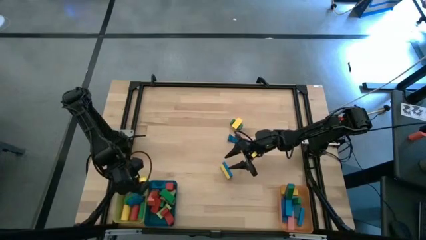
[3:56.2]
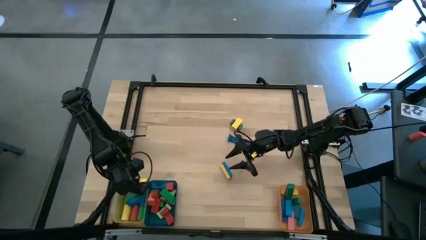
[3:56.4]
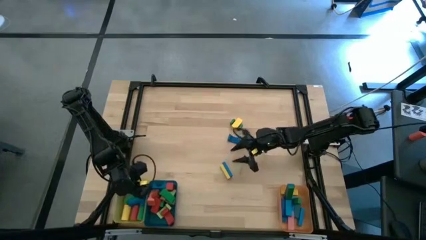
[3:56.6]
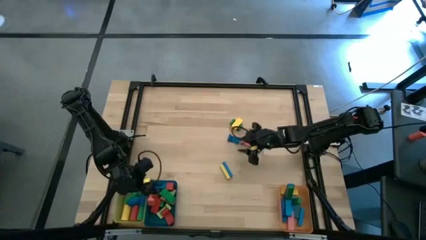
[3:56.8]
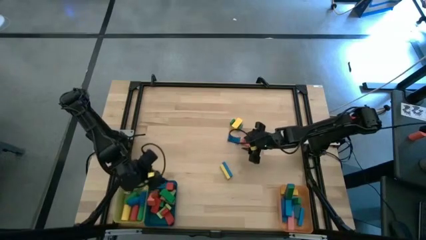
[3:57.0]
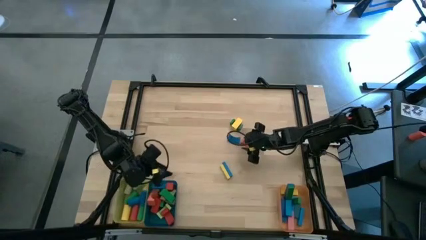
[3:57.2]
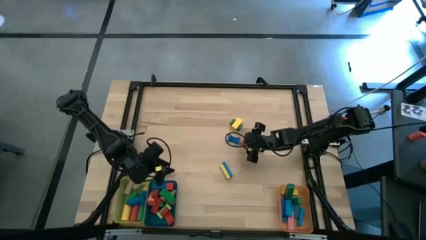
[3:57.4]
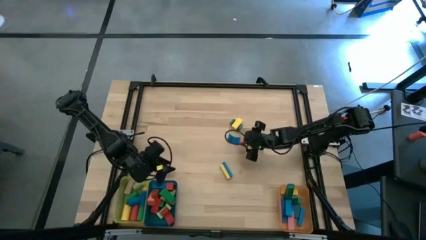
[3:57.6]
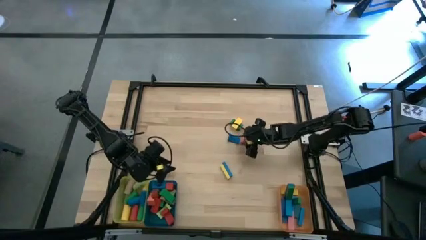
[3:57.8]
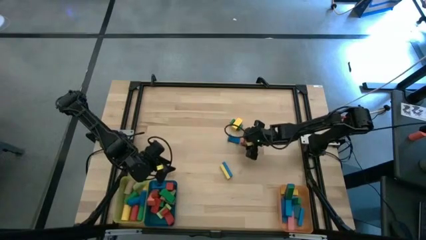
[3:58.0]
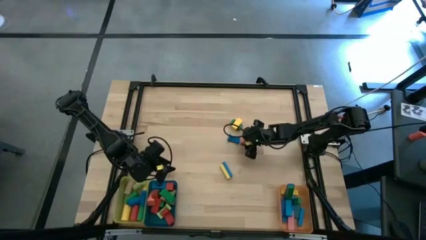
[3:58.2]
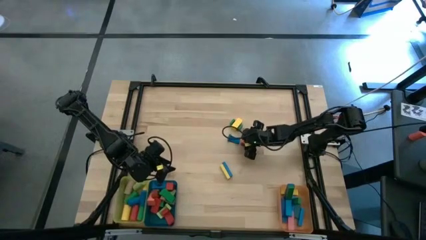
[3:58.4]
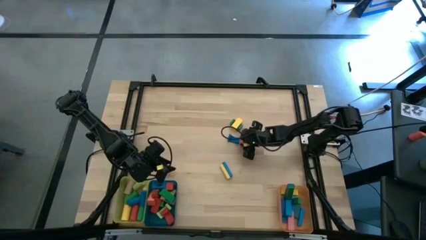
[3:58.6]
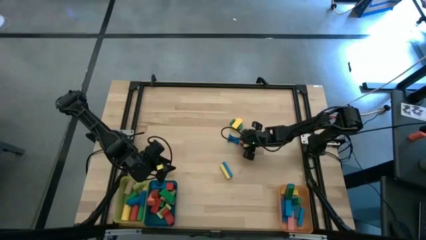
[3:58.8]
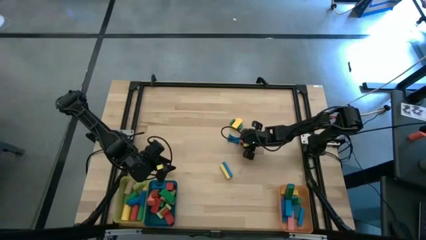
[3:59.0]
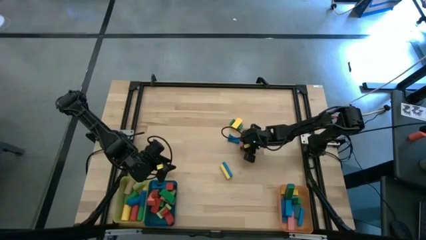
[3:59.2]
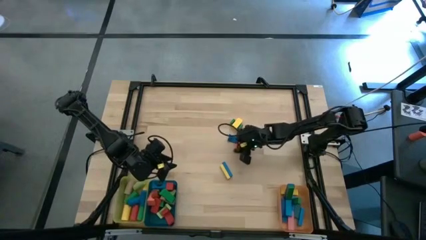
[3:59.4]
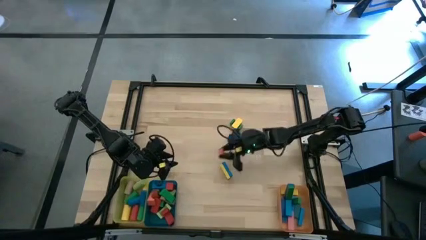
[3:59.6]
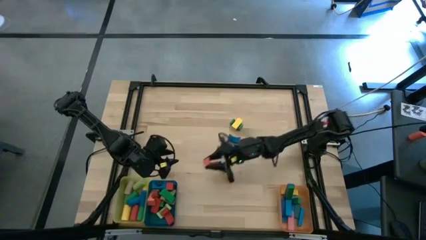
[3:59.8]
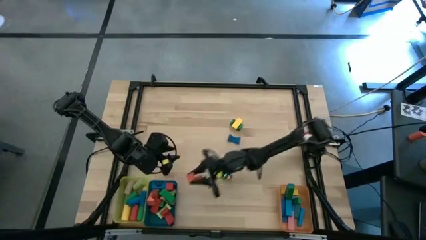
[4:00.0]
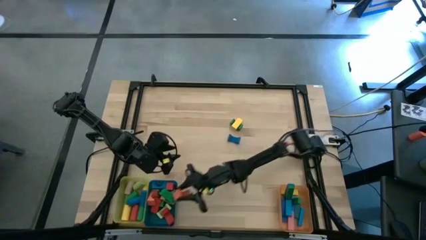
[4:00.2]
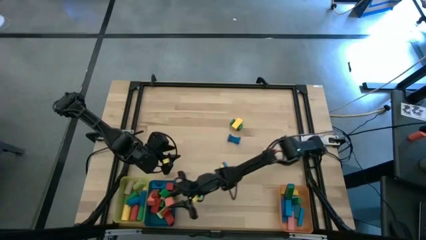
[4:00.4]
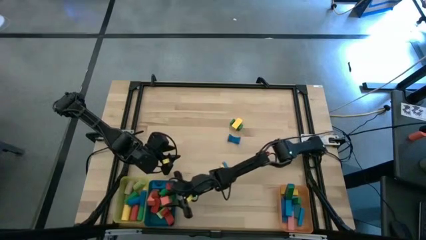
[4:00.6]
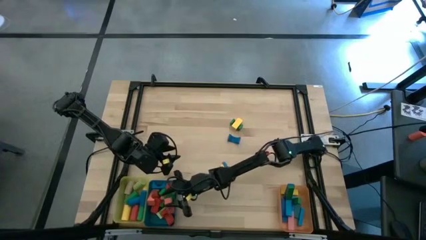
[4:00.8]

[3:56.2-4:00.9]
Task: Sort blocks by size
Put the orange arch block into the blue bin

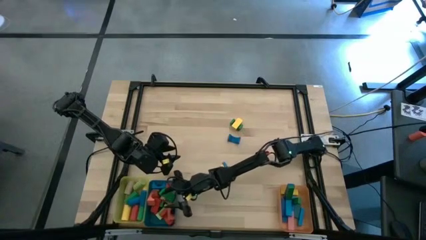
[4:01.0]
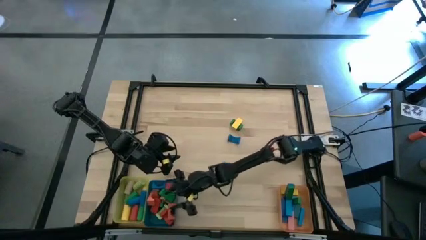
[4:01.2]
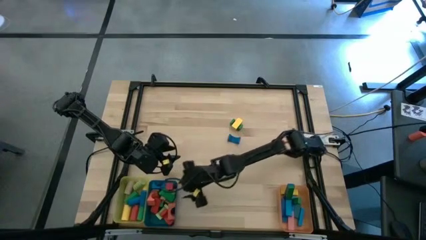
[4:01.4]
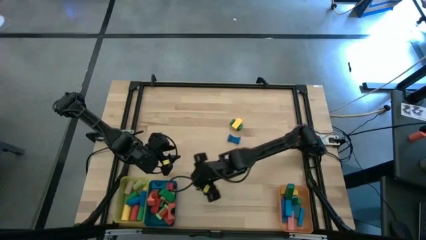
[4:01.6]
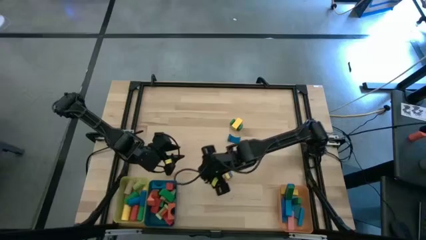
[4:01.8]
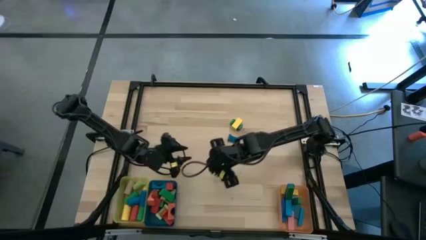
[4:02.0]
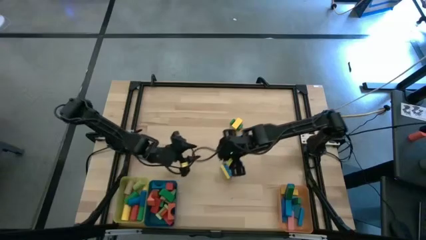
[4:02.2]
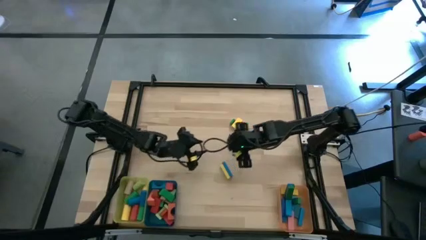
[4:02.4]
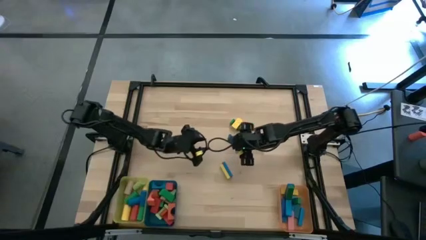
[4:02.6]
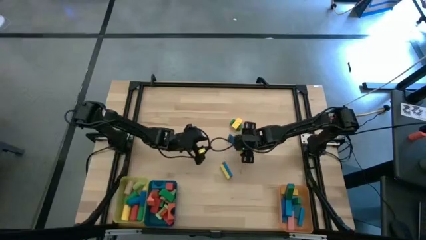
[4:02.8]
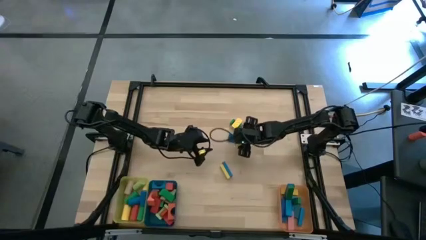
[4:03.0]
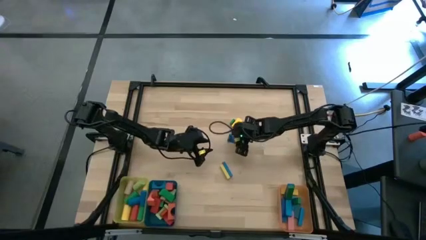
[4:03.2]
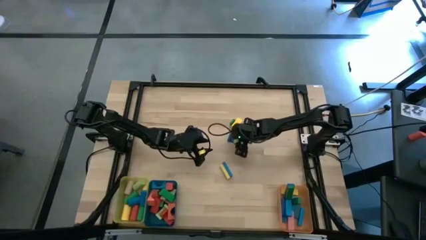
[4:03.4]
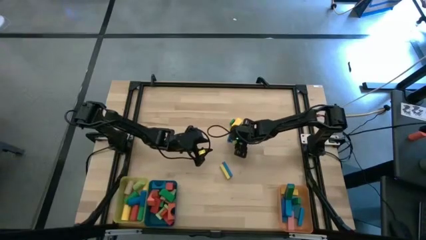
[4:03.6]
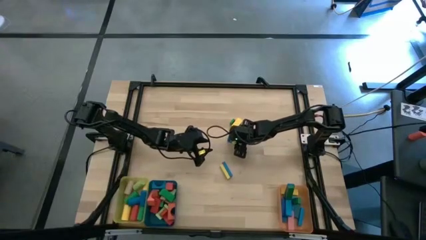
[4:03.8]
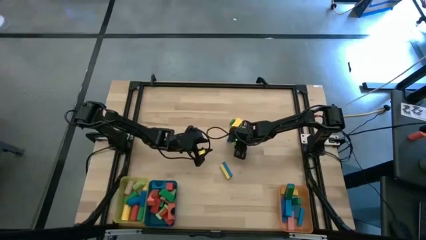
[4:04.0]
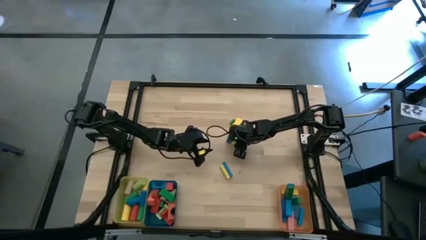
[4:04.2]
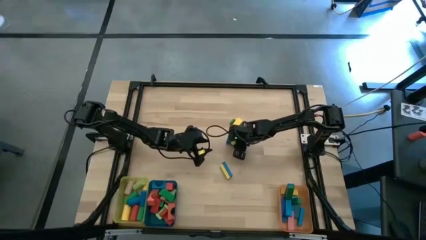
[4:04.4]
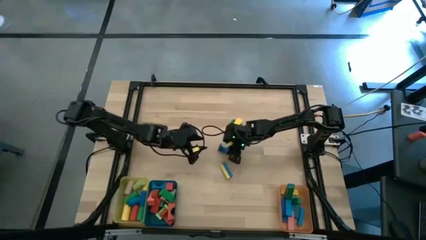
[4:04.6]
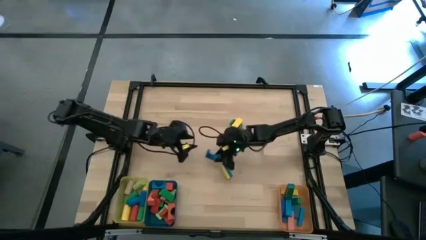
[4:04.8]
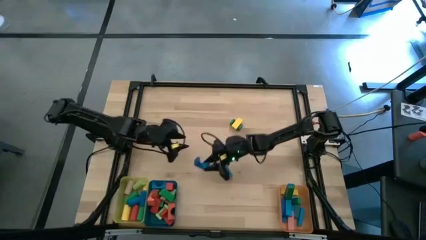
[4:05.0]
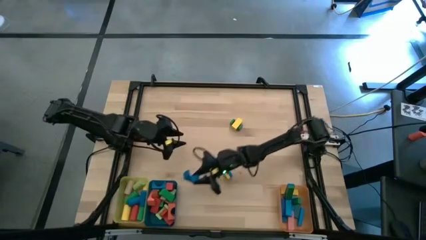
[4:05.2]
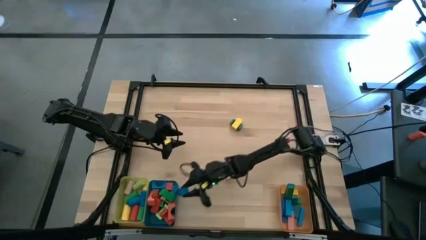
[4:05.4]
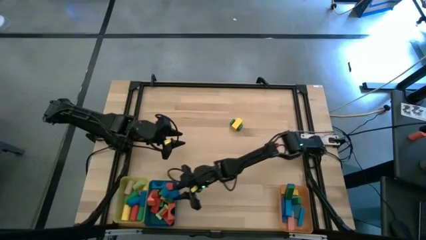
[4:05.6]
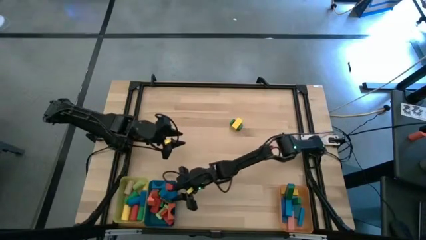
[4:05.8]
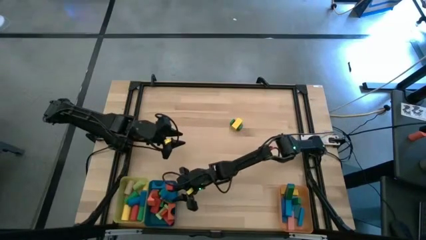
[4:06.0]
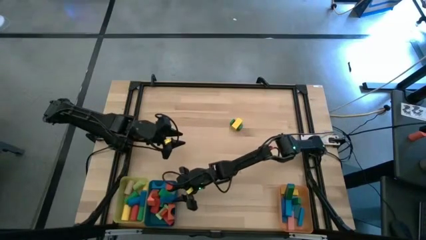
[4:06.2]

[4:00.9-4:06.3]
Put the blue arch block into the blue bin

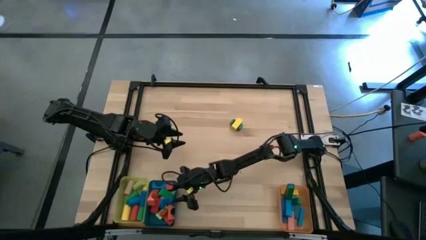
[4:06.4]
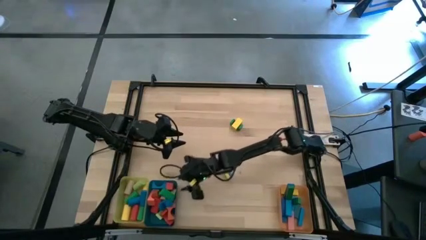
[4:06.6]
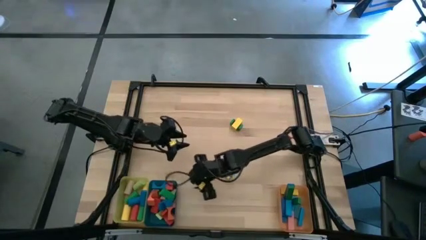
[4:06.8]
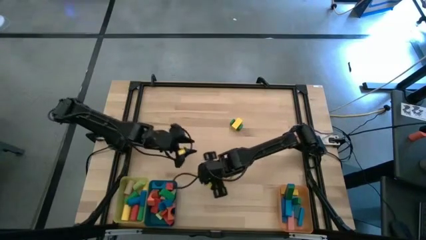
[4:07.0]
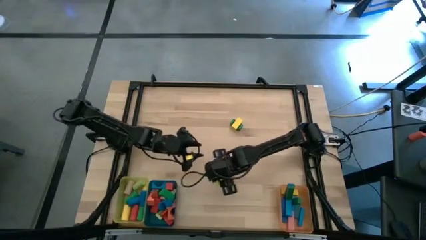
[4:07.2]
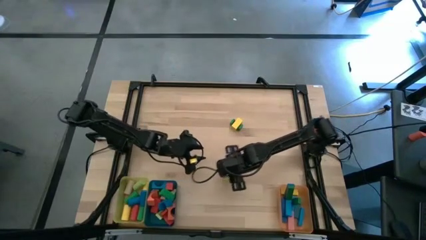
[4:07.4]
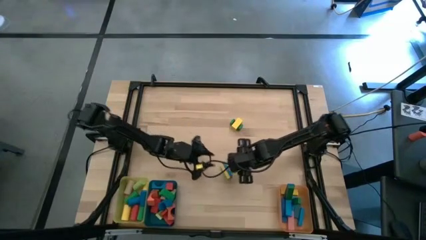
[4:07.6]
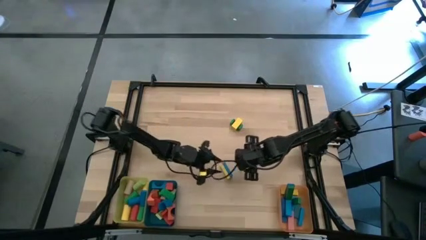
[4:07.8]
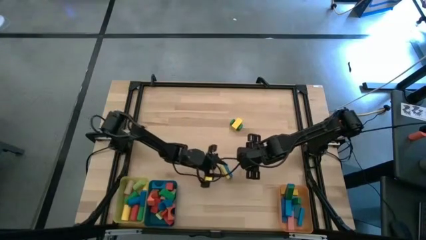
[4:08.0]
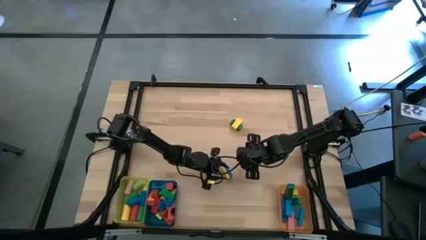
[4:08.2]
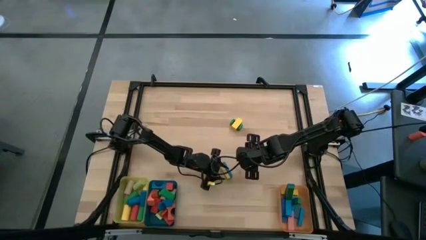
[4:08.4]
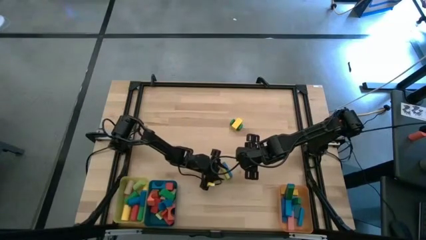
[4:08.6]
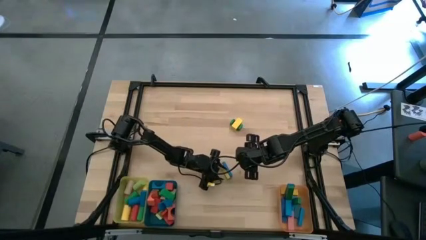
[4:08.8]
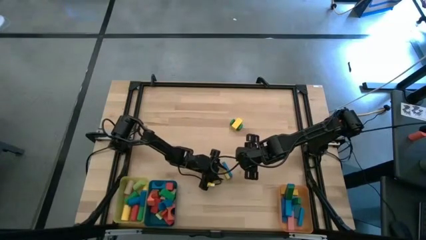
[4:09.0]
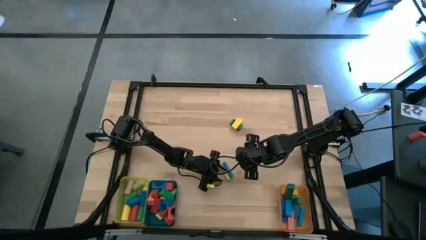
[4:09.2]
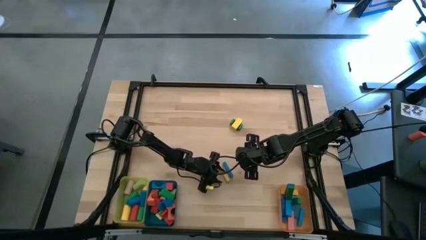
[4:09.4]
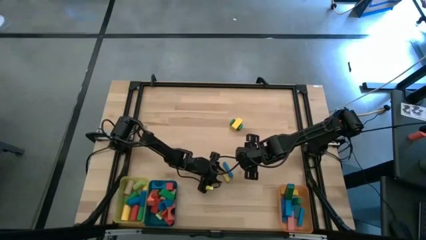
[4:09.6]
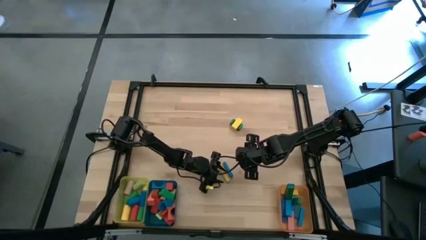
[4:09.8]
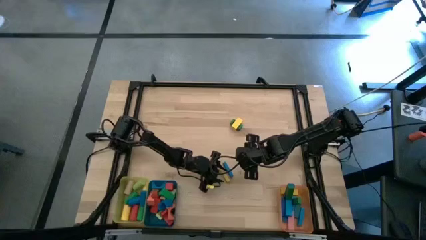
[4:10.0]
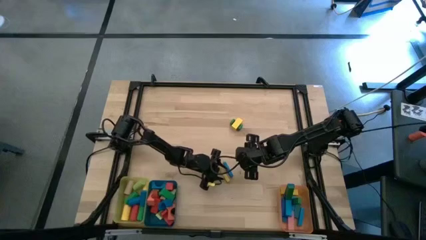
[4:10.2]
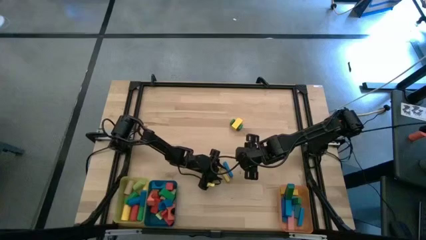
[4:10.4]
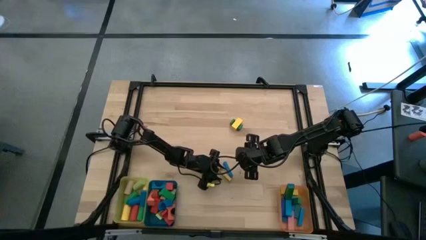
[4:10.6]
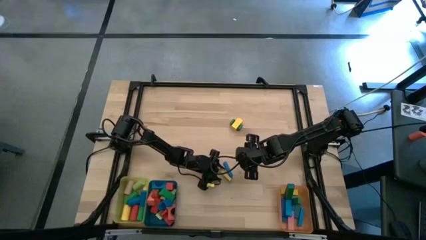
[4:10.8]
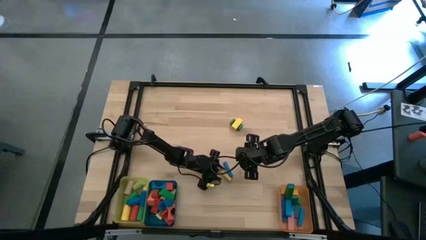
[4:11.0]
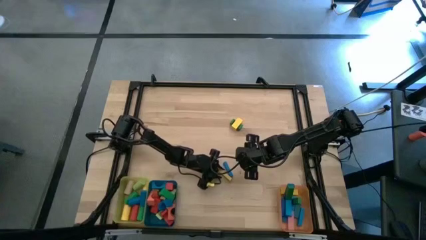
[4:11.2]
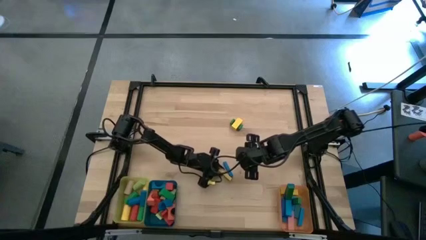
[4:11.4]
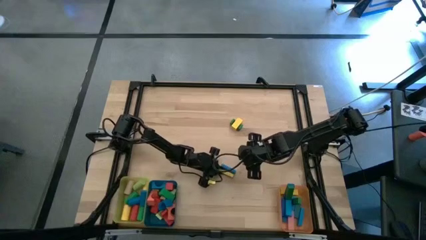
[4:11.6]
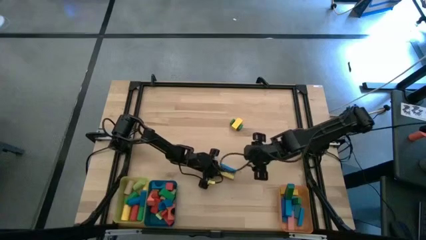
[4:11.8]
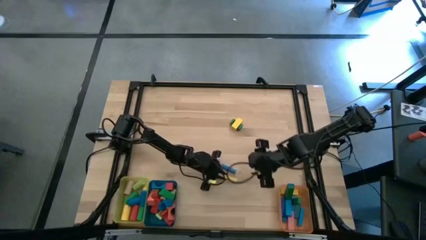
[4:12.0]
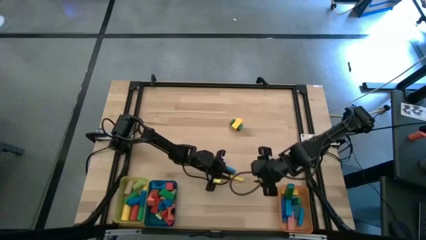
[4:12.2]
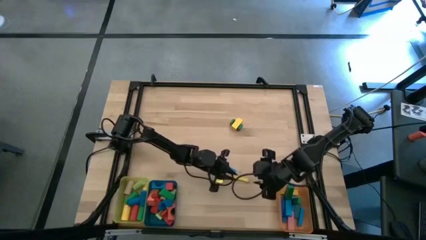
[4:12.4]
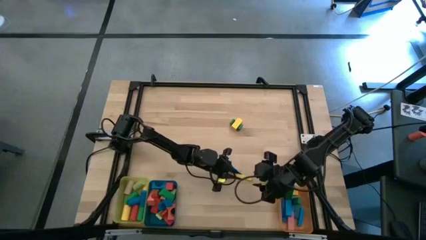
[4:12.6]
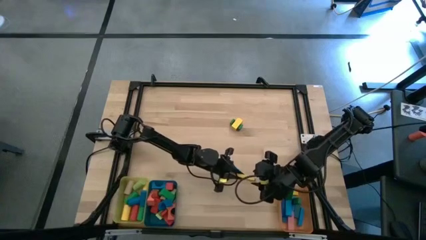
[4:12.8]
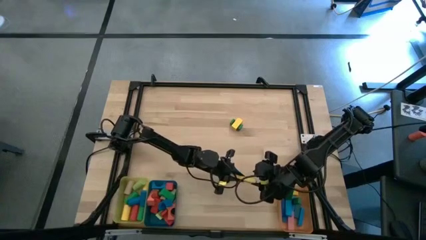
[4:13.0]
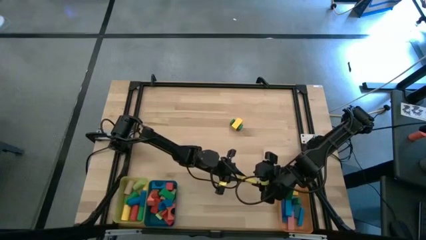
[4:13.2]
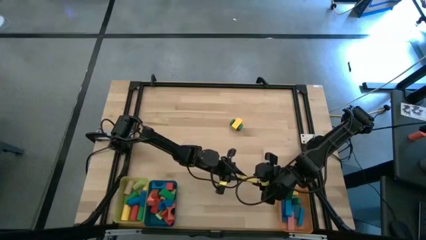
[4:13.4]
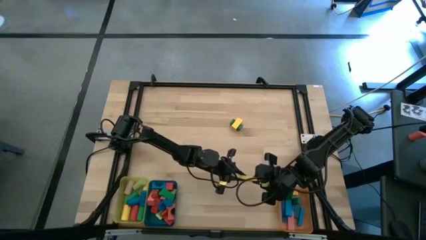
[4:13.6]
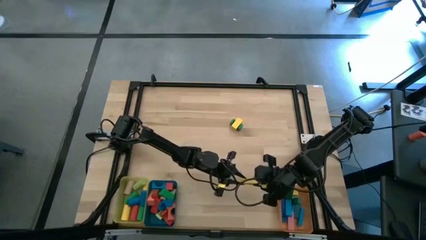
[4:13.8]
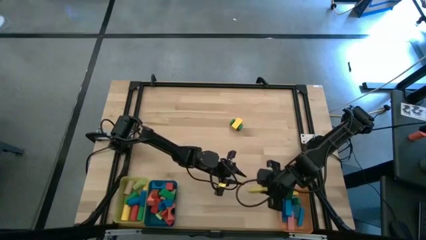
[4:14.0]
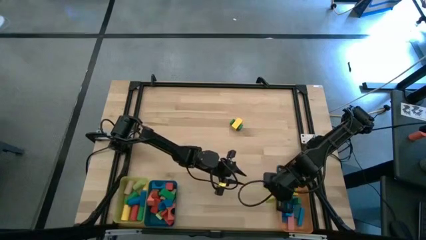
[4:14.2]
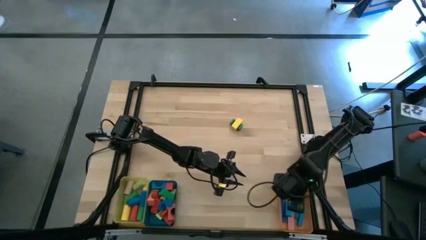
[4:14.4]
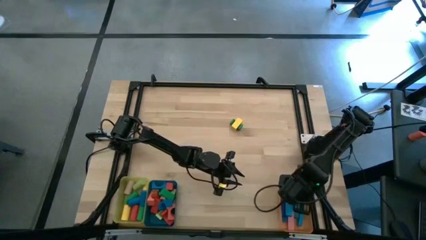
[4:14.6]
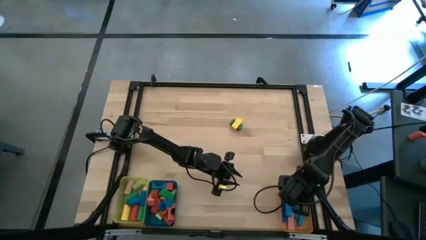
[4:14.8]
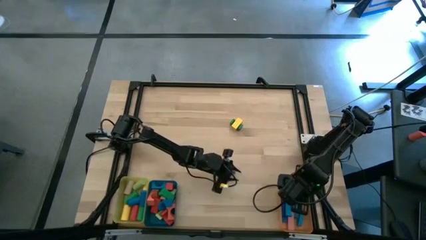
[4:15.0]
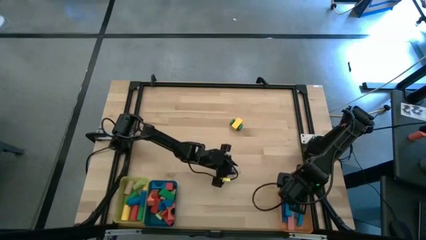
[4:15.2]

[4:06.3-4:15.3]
Put the yellow rectangular block into the orange bin
